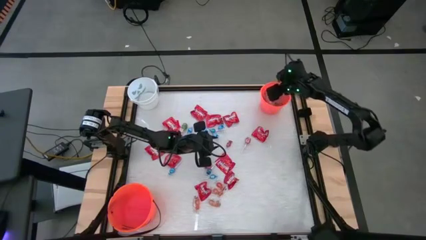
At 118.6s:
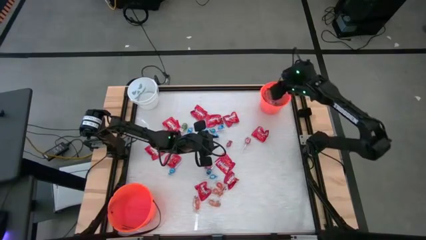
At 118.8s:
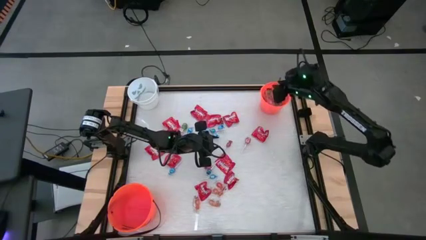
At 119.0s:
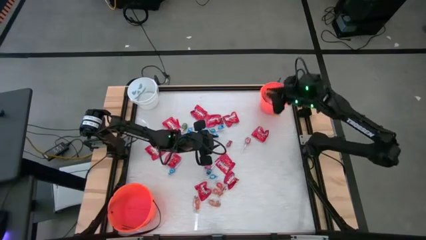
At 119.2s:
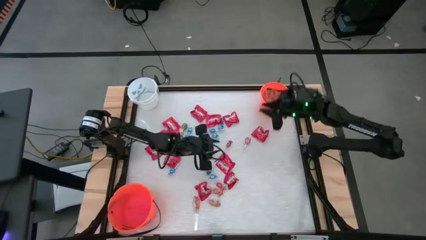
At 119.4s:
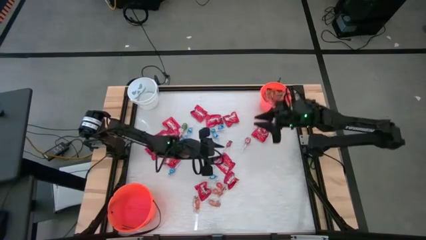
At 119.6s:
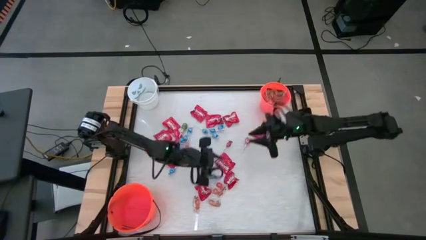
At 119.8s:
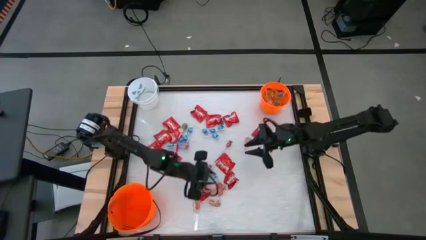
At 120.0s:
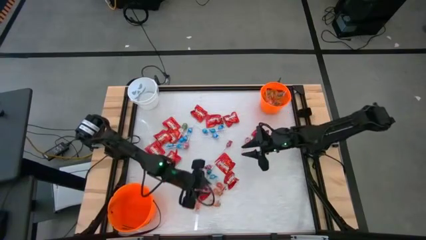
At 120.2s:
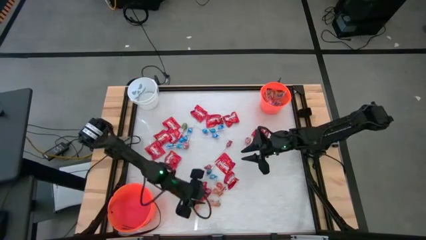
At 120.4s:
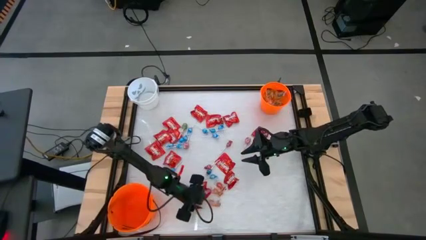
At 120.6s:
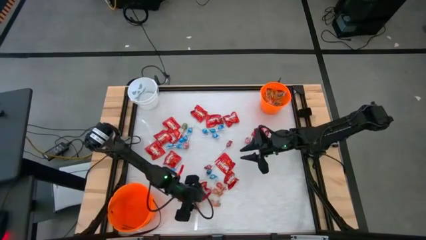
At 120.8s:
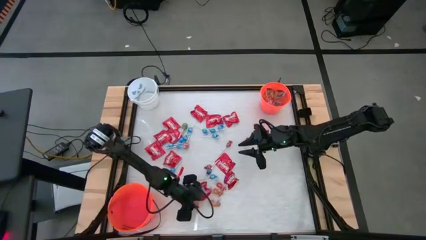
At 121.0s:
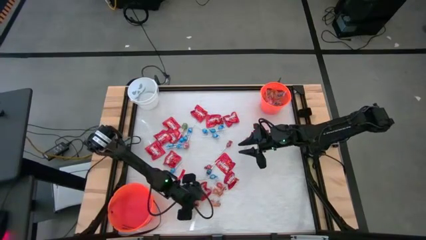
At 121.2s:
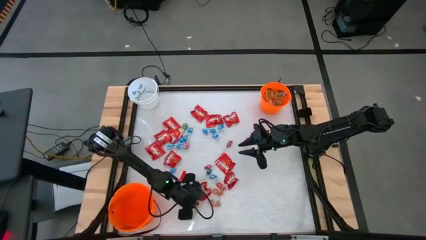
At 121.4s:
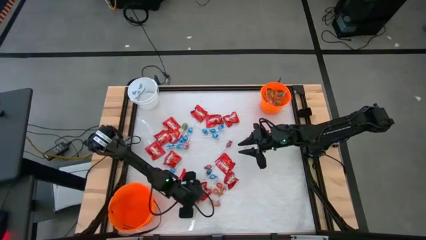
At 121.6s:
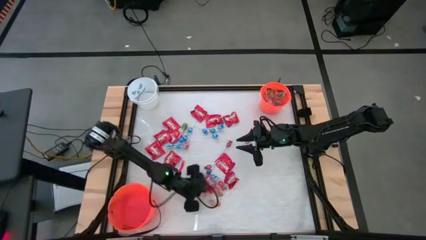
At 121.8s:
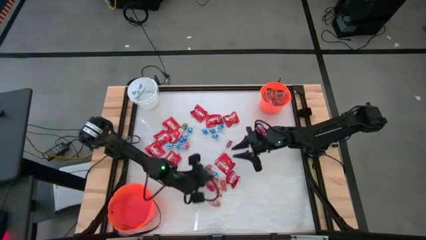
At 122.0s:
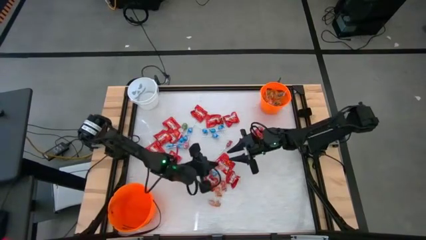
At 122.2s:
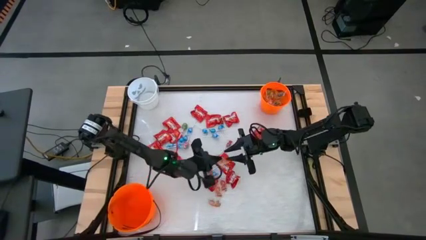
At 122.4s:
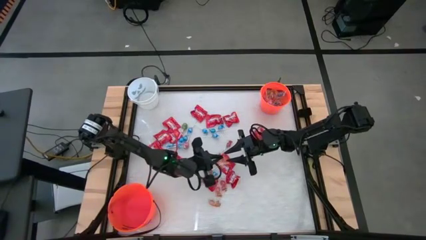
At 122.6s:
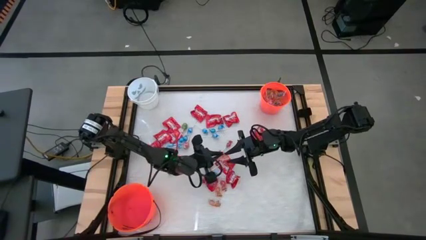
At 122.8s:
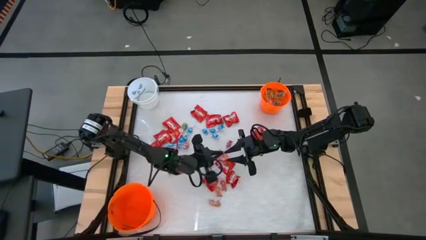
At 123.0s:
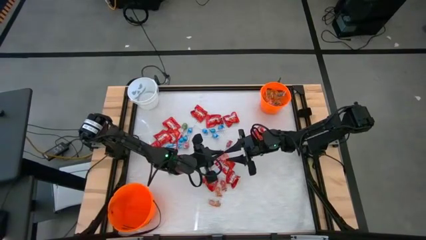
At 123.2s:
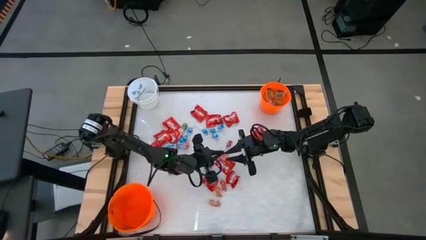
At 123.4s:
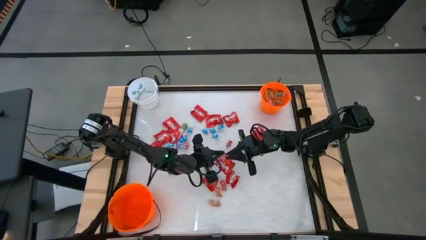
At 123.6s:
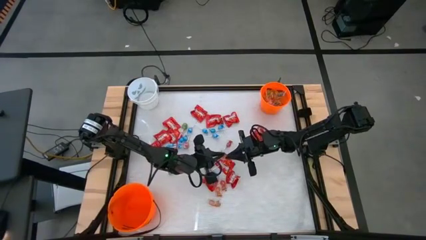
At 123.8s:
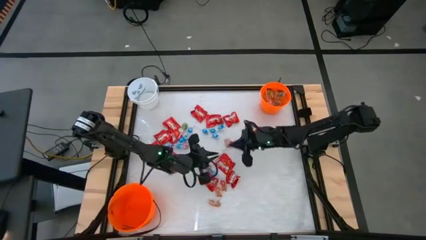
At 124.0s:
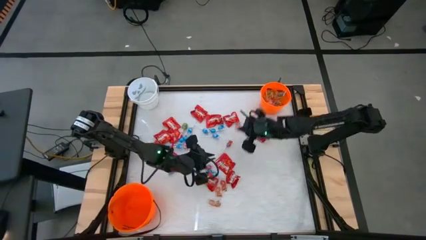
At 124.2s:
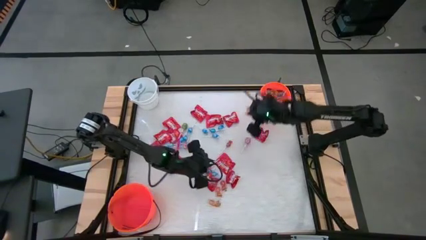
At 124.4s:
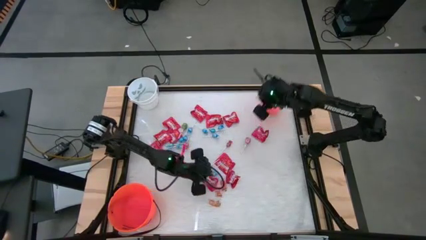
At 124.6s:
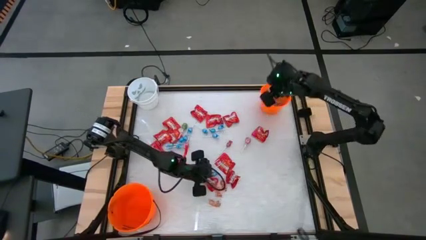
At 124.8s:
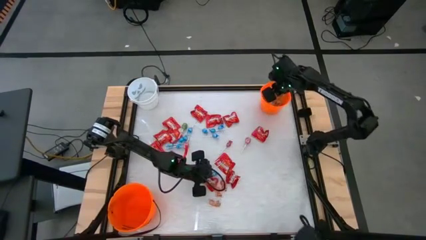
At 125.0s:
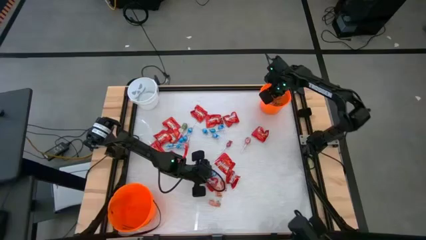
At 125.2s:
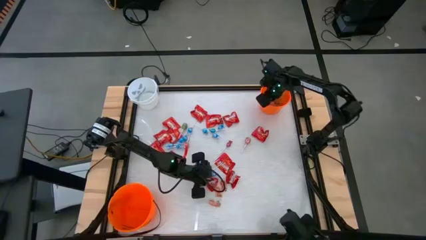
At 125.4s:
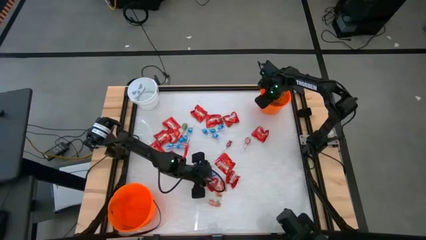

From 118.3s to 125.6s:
Task: Sort candy by brand, put in halloween buckets
Put the bottom left orange gummy into the top orange bucket

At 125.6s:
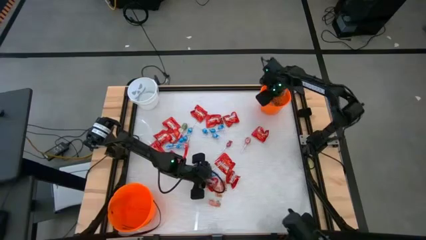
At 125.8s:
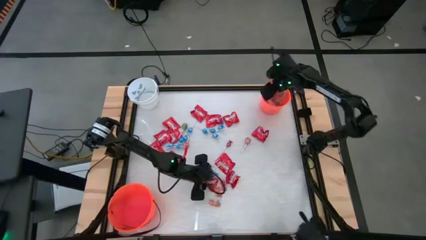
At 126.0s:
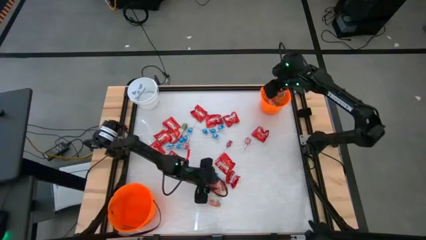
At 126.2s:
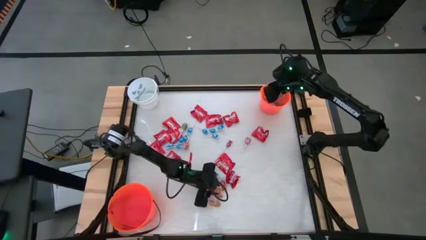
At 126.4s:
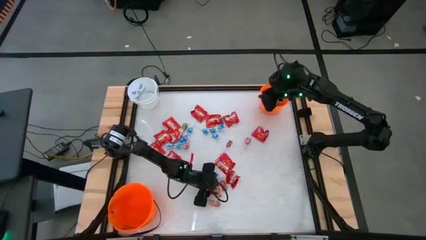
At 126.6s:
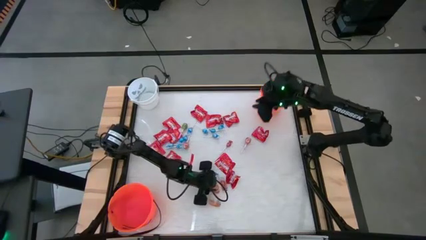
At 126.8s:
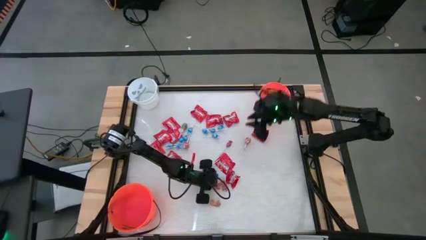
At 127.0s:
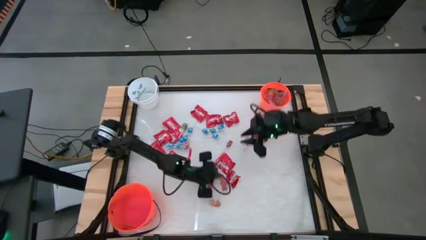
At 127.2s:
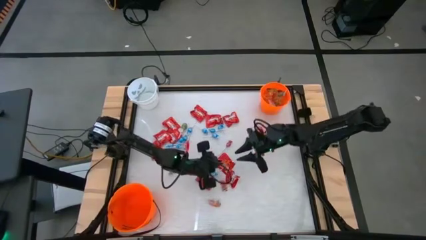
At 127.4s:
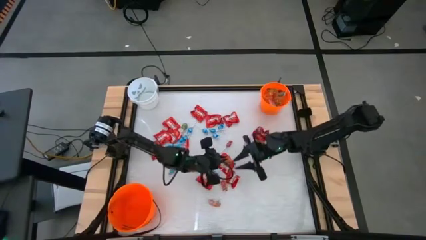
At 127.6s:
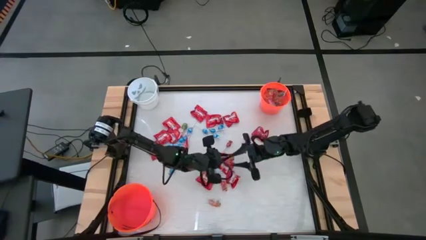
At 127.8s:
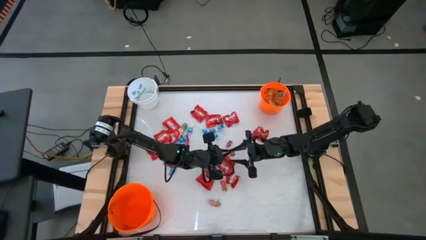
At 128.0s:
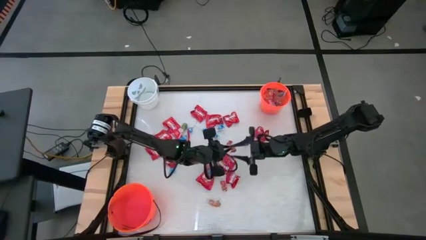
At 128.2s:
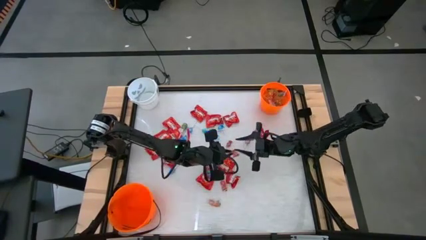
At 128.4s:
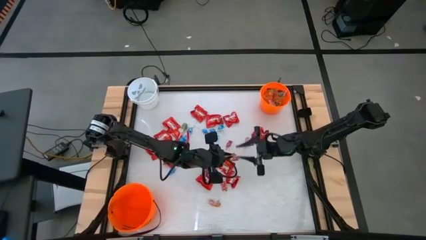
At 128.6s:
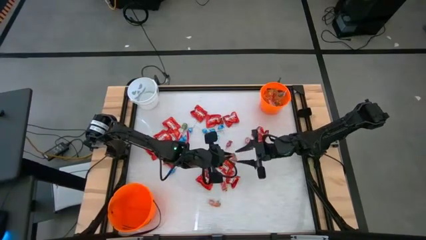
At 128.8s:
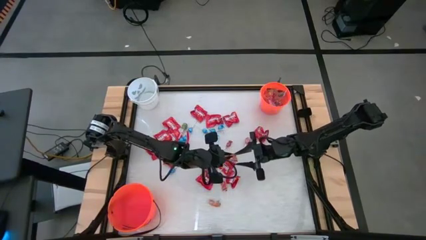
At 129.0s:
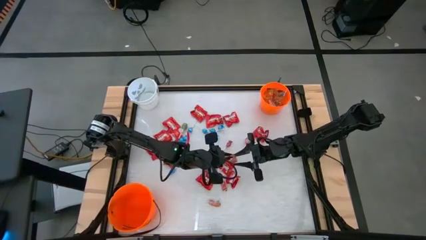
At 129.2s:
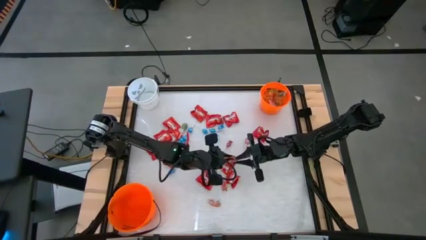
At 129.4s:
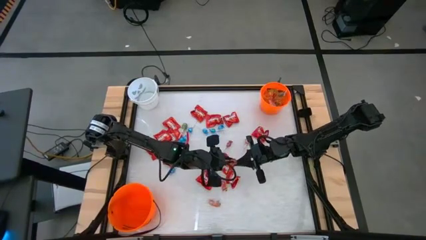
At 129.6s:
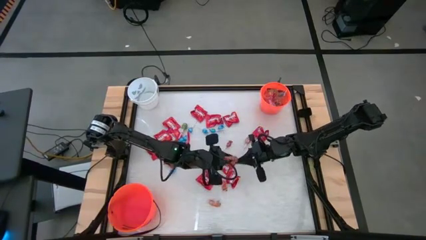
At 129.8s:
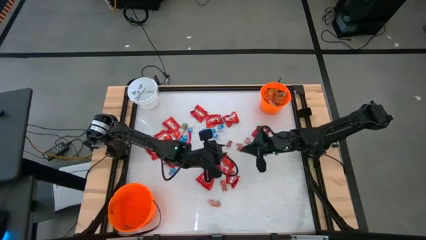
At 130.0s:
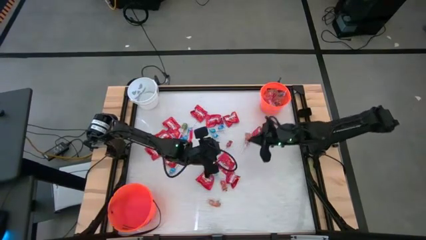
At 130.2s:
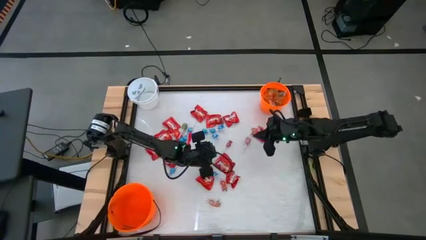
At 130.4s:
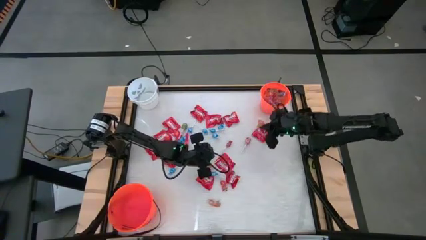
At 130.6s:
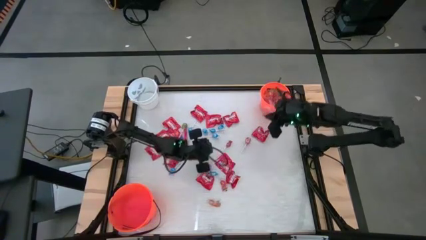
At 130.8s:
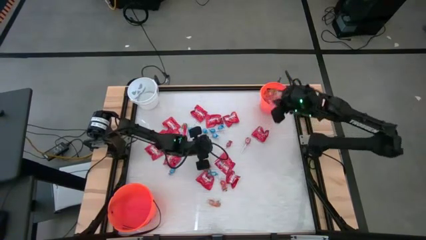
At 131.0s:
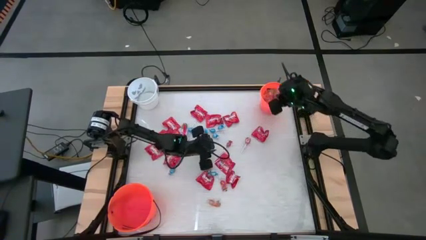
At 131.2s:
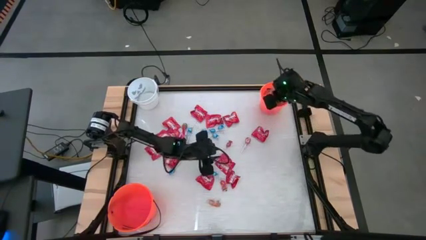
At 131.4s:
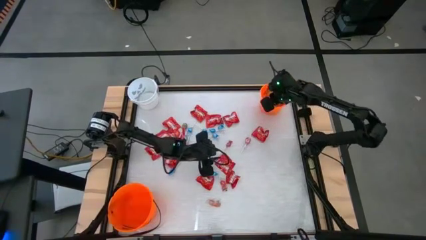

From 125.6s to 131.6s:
Put the top orange gummy into the top orange bucket

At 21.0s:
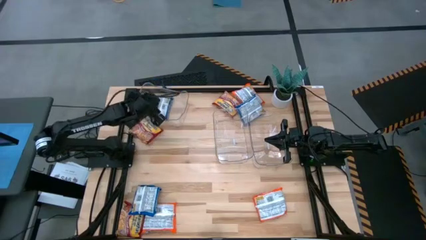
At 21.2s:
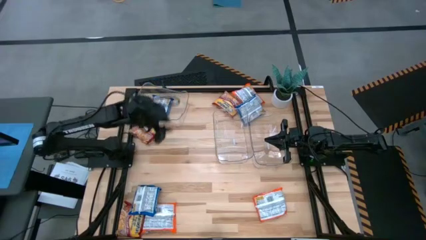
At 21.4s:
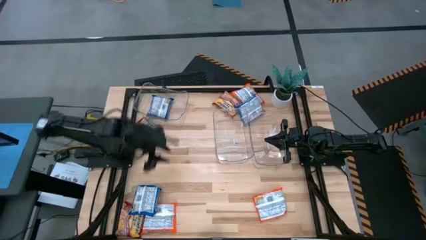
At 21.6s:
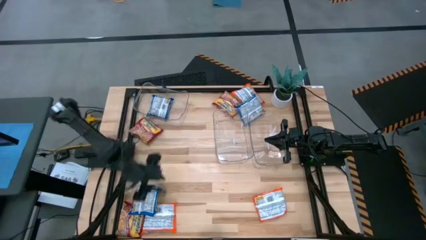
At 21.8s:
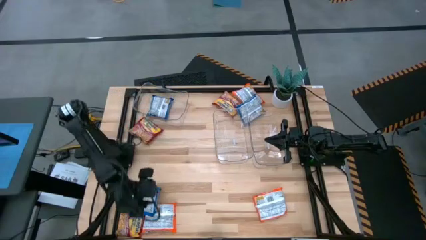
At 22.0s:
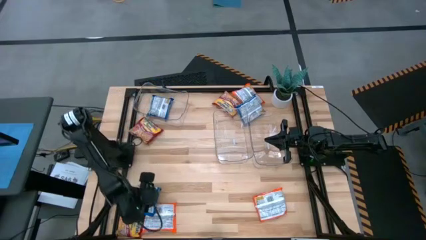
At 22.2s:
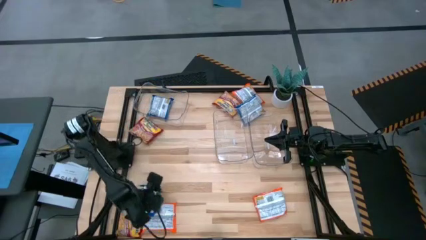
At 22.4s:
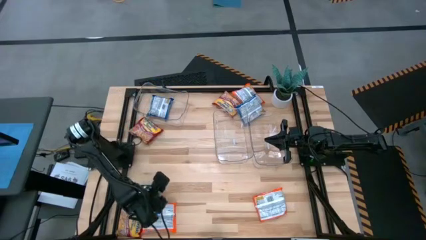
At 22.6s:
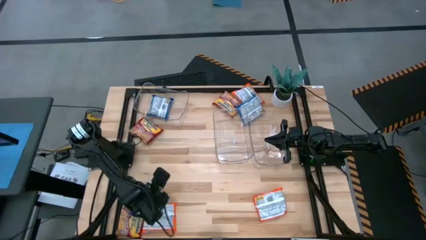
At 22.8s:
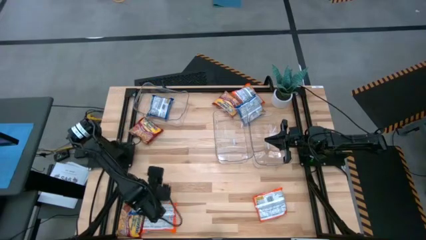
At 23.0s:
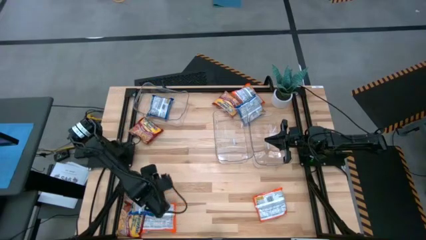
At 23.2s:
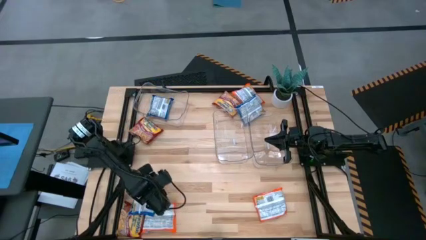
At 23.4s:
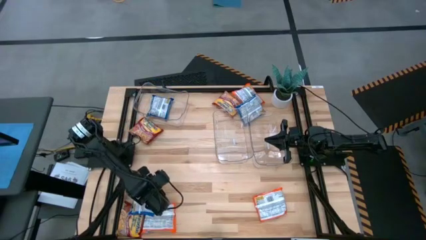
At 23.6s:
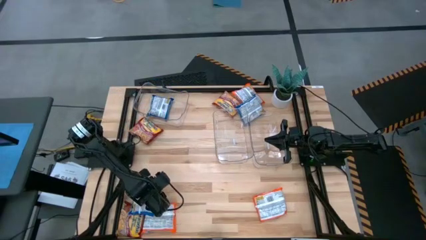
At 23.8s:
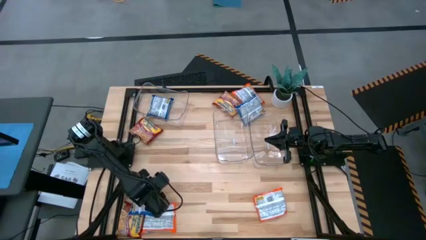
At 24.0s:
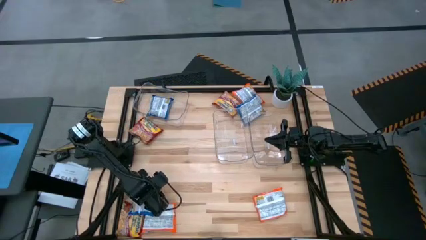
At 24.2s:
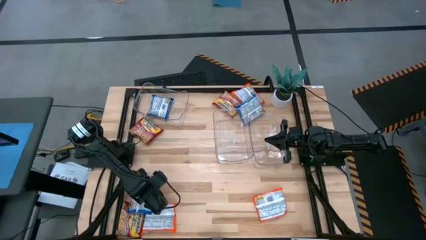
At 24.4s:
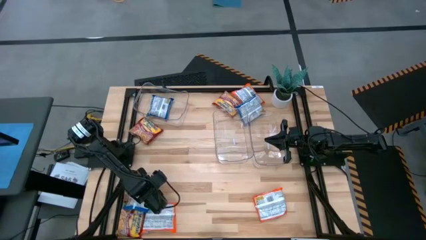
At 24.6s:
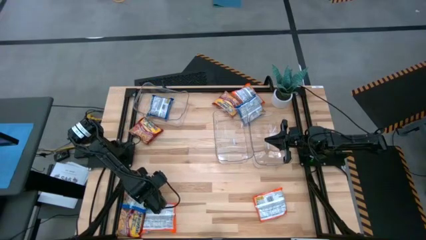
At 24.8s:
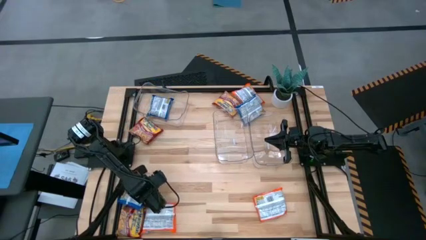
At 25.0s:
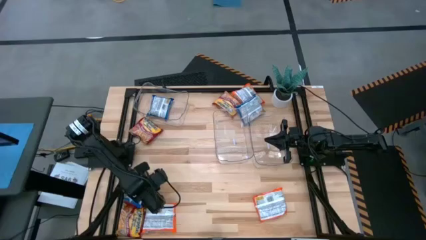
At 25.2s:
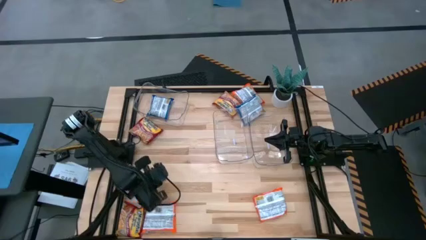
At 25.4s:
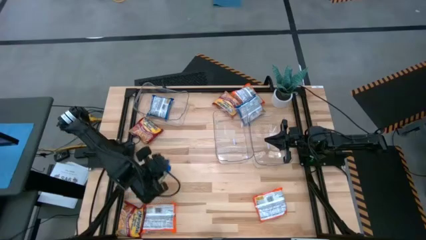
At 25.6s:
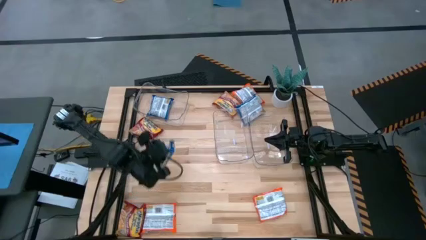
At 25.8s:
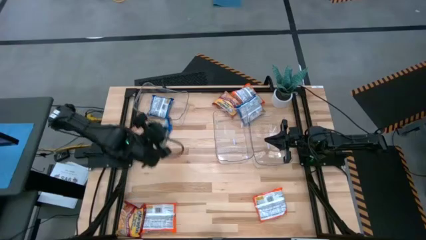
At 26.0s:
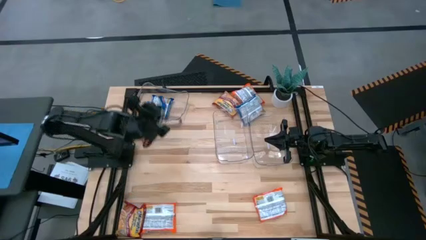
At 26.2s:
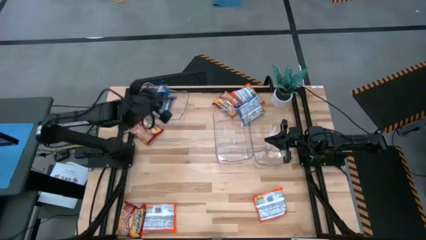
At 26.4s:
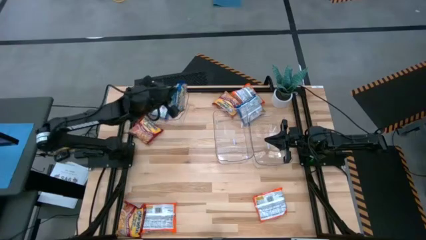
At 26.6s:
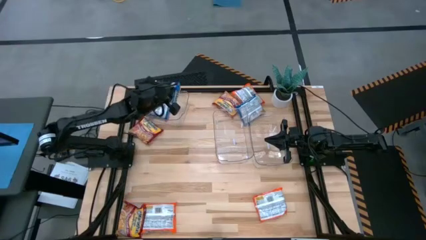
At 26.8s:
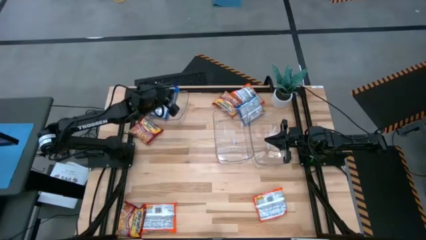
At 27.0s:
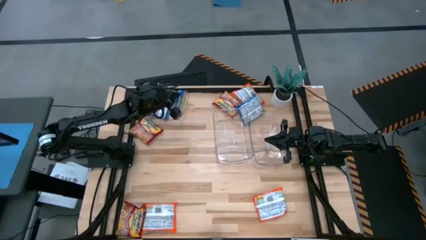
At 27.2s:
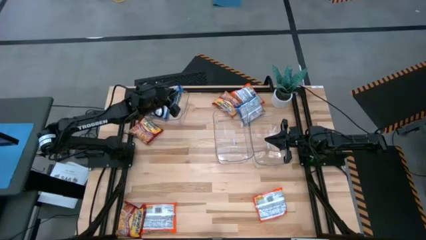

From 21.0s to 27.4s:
Task: Sort Maruchan noodles
Put the bottom blue noodle pack into the top left transparent bin
